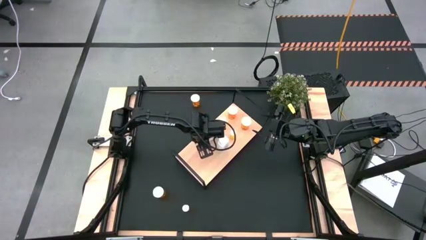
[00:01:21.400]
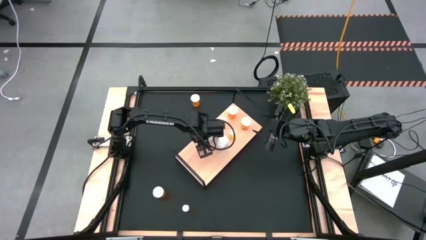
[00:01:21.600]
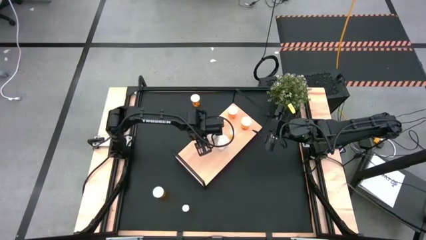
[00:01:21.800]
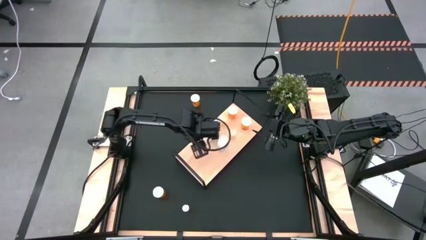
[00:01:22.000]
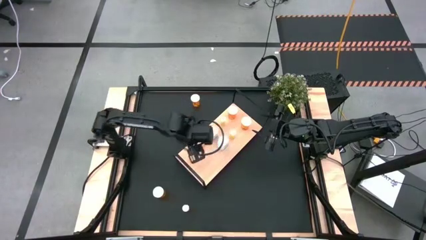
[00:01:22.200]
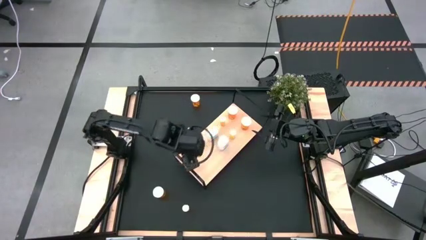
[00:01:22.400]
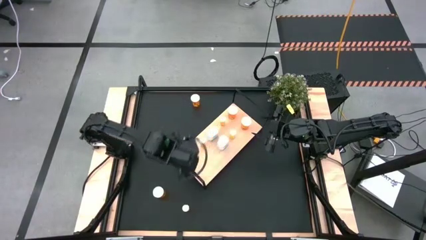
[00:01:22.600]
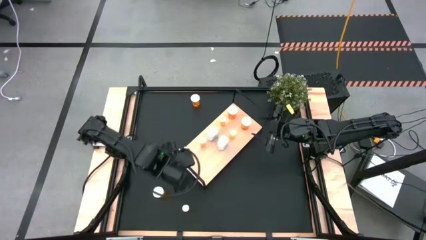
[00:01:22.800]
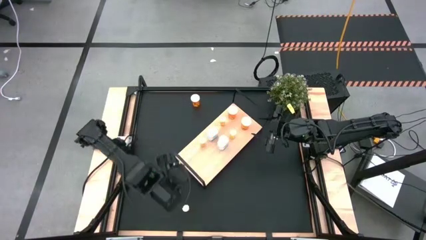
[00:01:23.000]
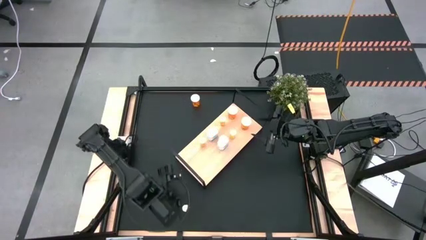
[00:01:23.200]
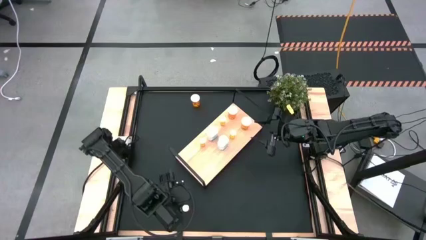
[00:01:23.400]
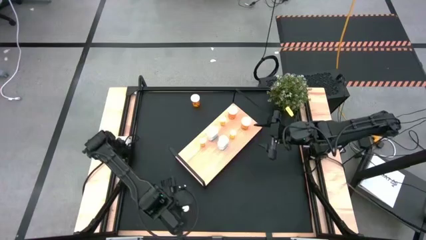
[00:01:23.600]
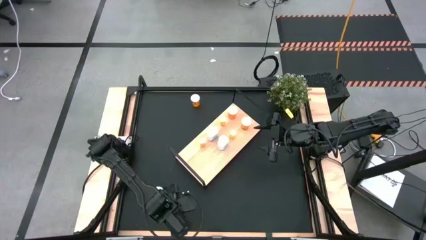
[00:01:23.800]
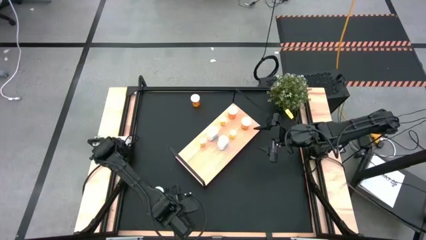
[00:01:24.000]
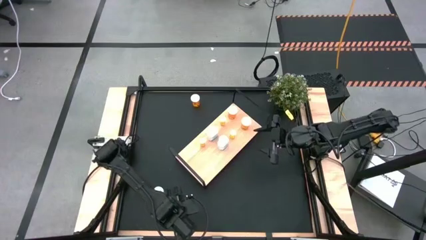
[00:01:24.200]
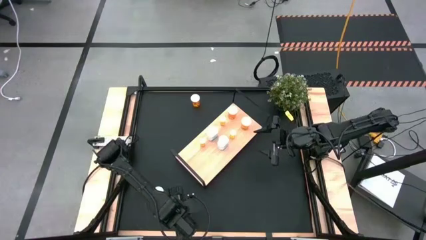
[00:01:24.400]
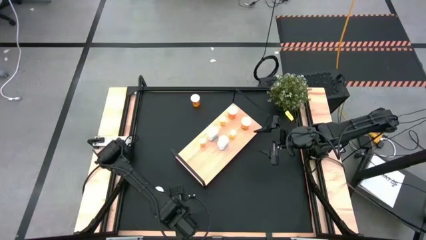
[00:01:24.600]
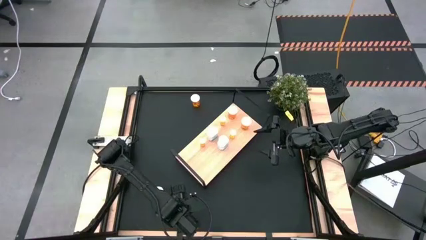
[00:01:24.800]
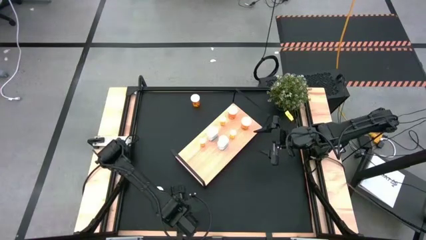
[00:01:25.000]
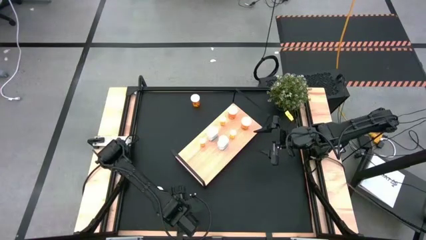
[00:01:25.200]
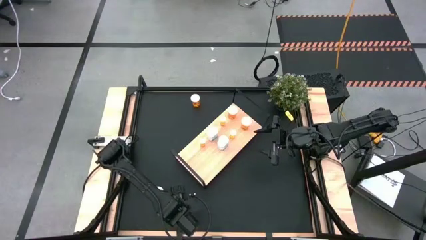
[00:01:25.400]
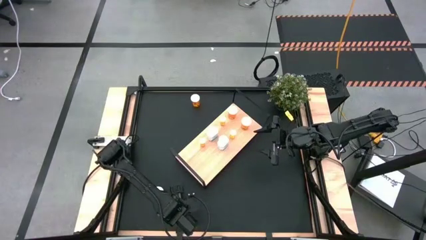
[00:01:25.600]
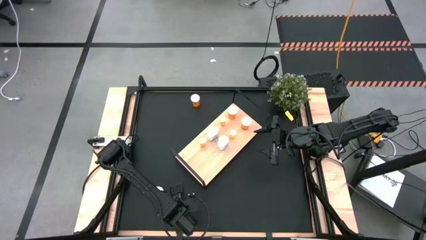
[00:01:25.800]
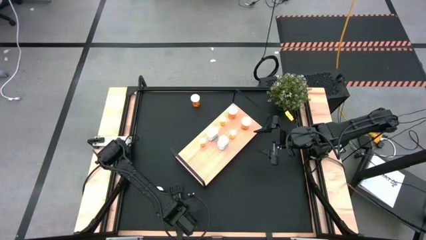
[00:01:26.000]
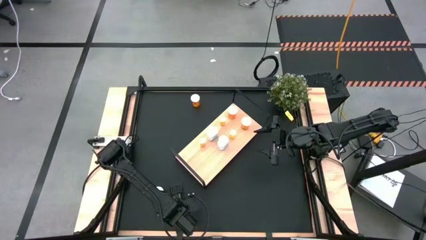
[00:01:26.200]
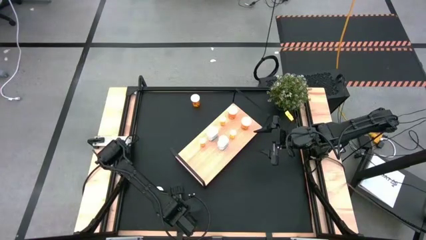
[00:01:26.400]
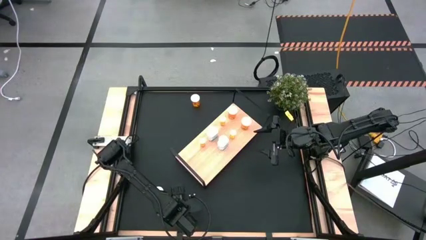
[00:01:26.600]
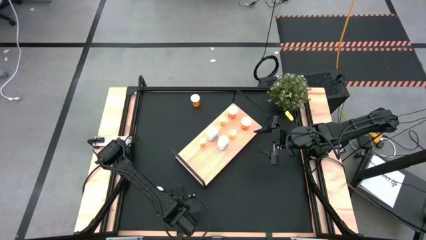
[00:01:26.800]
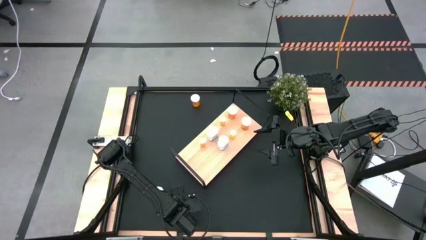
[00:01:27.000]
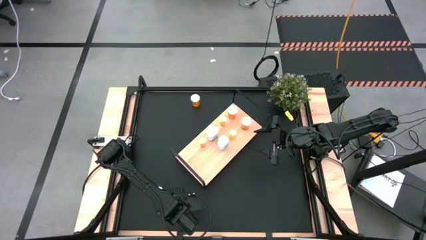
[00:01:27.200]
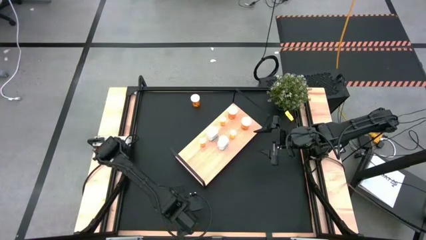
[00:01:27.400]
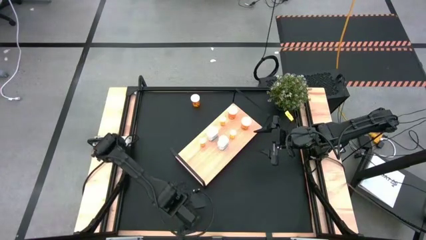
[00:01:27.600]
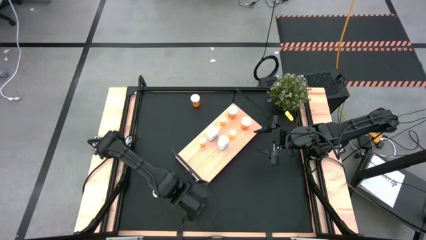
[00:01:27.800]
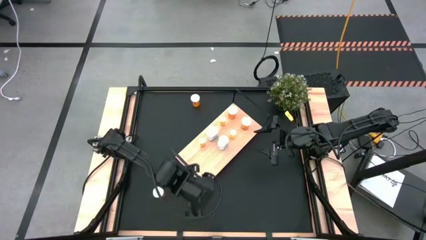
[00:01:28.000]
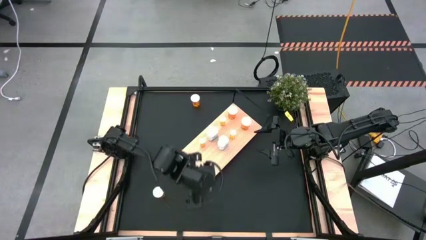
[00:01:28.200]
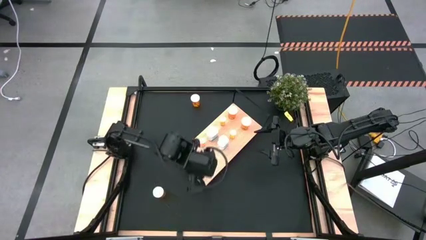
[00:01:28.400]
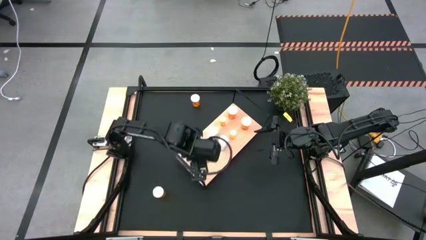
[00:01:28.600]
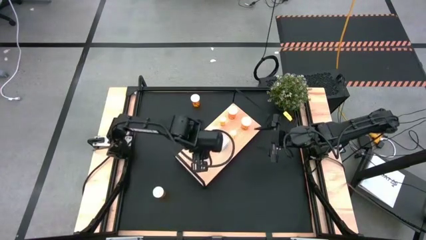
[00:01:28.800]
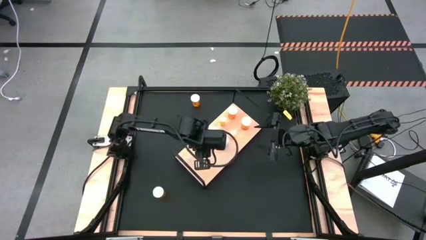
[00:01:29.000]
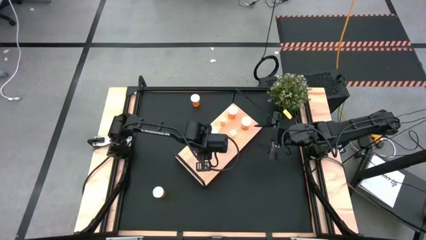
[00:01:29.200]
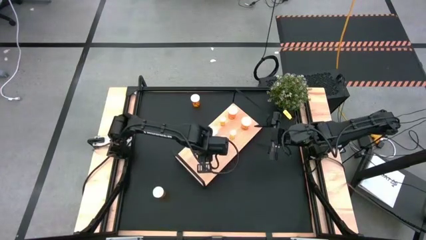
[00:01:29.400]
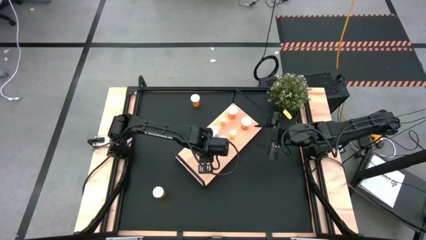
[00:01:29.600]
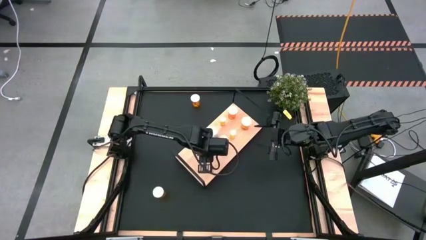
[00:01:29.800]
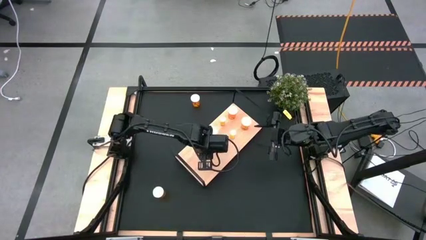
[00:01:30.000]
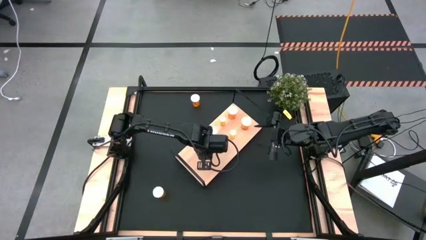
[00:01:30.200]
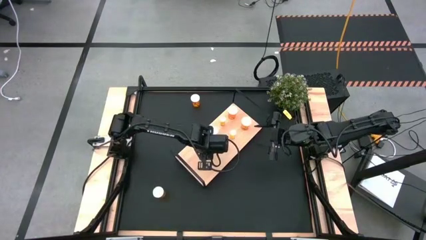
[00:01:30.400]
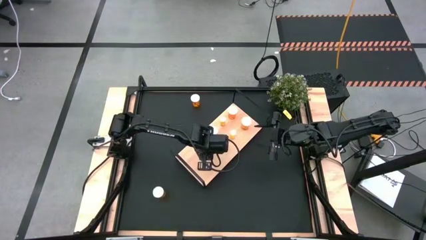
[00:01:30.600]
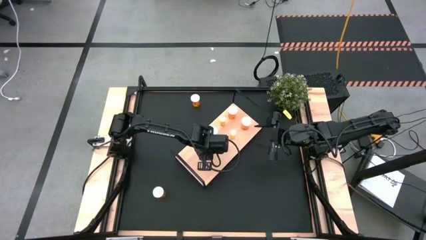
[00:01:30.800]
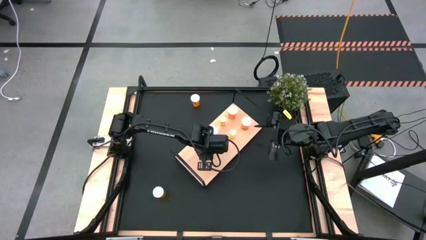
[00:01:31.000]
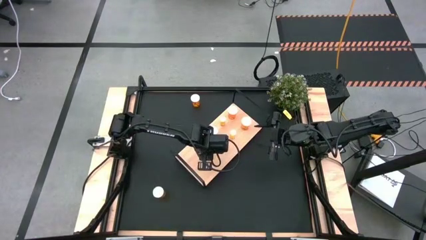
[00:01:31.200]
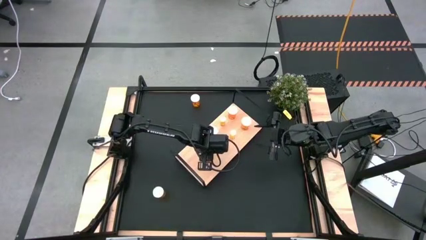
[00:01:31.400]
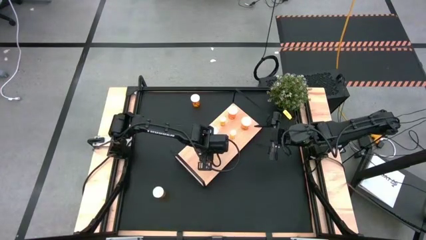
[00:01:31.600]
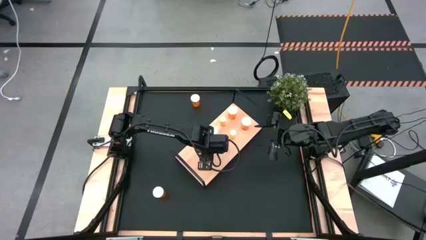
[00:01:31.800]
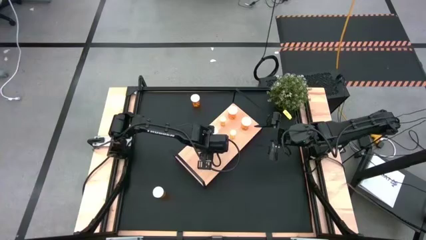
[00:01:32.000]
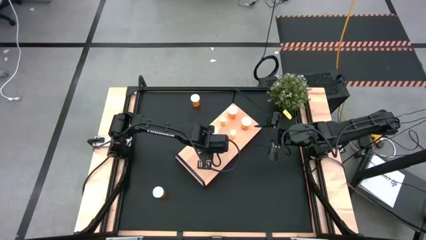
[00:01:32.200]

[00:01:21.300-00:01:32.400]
Task: Pick and place medicine bottles onto shelf by color
Align the small pill bottle with the other small pill bottle on the shelf

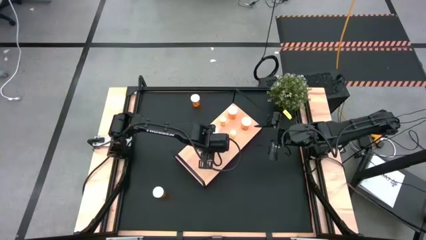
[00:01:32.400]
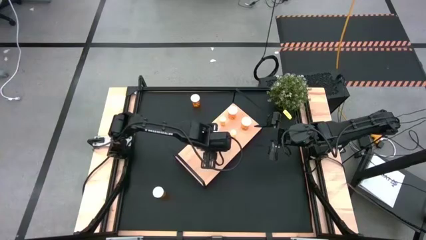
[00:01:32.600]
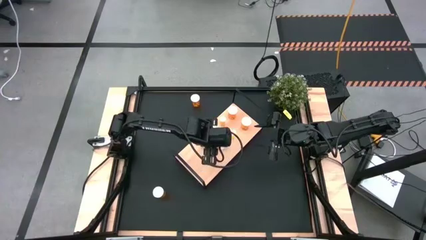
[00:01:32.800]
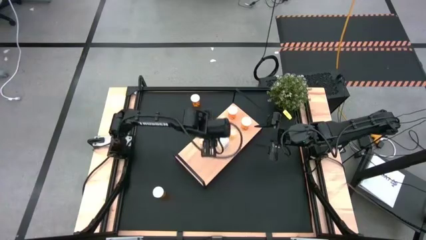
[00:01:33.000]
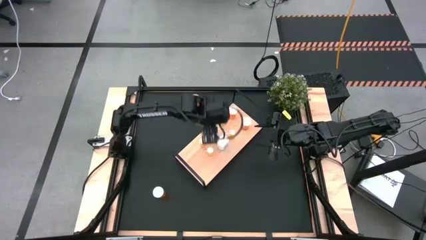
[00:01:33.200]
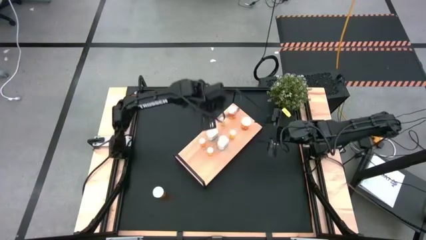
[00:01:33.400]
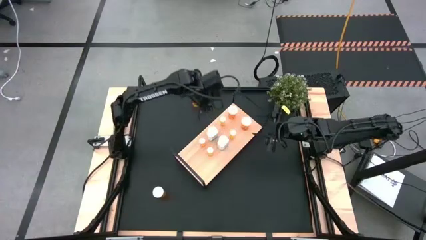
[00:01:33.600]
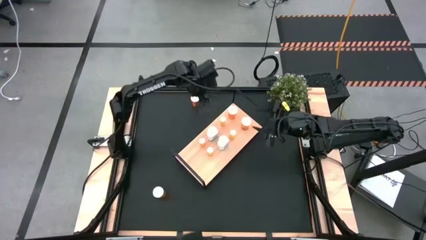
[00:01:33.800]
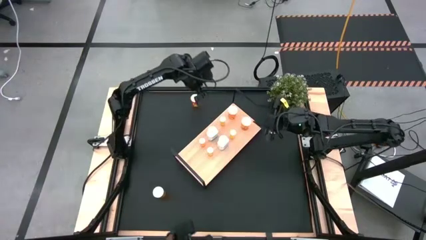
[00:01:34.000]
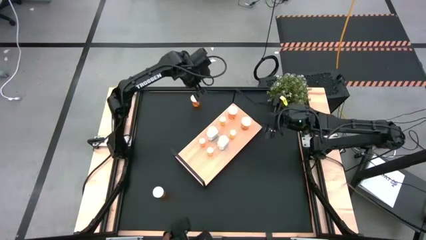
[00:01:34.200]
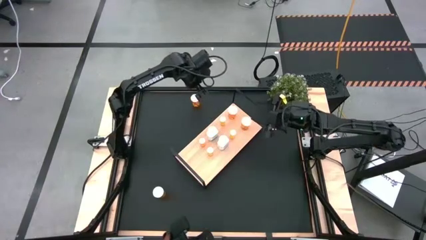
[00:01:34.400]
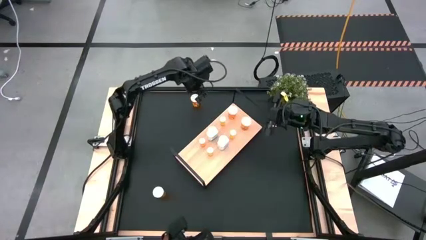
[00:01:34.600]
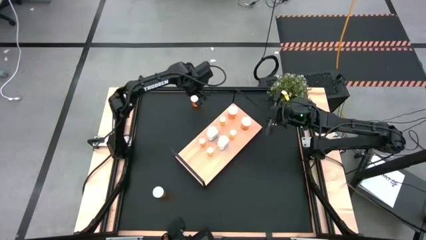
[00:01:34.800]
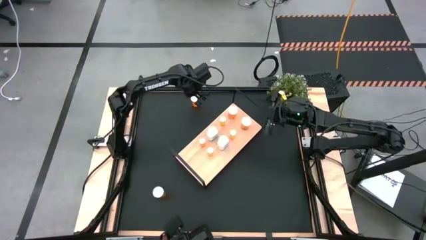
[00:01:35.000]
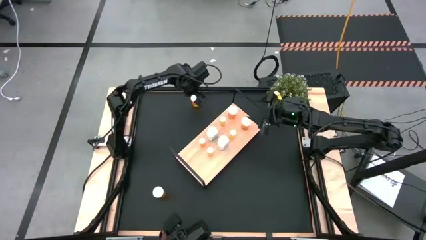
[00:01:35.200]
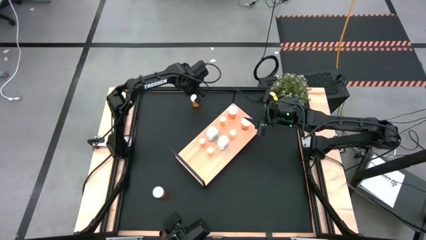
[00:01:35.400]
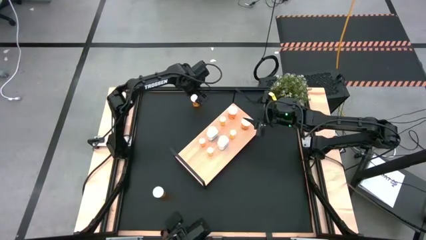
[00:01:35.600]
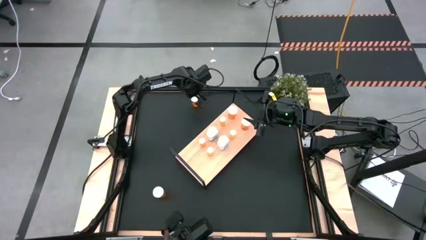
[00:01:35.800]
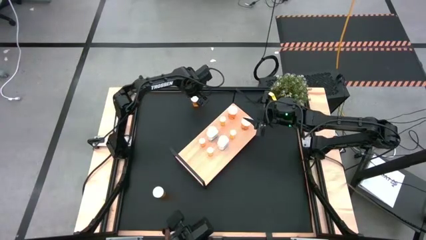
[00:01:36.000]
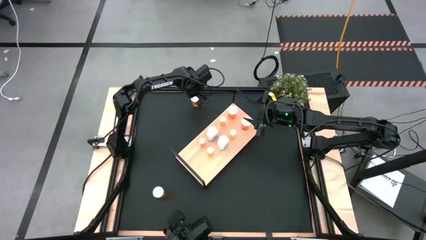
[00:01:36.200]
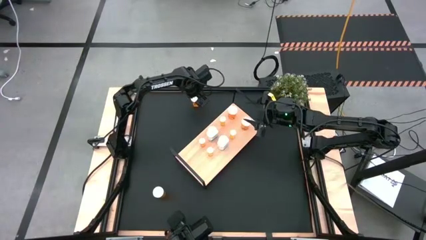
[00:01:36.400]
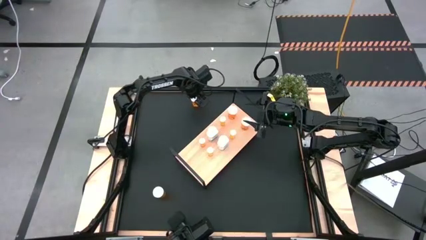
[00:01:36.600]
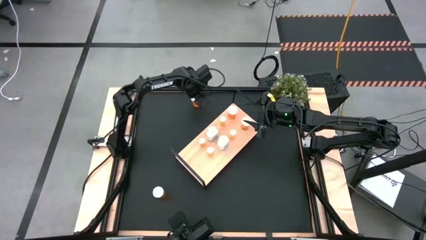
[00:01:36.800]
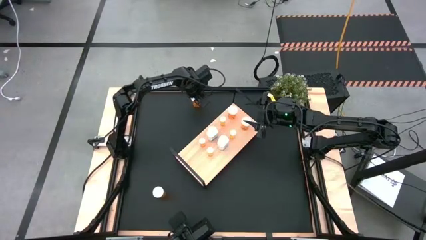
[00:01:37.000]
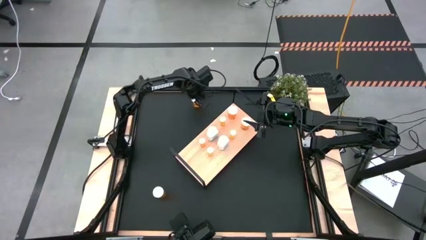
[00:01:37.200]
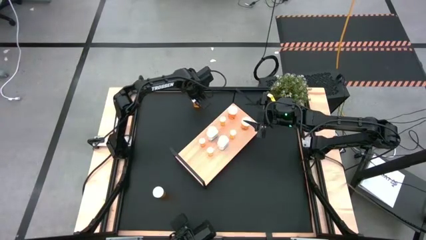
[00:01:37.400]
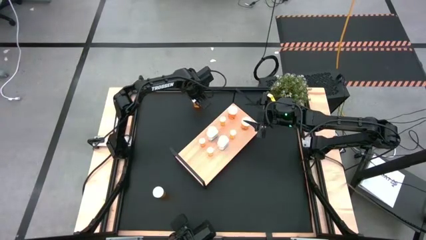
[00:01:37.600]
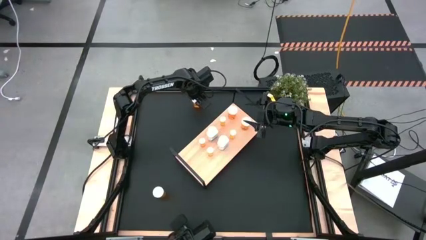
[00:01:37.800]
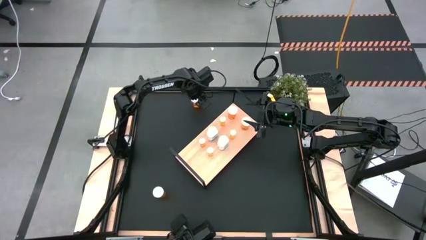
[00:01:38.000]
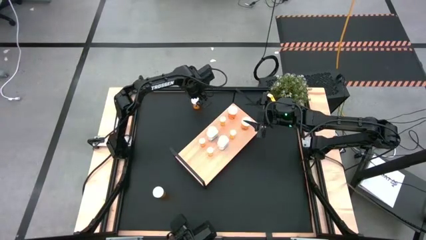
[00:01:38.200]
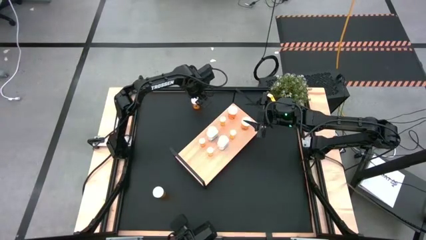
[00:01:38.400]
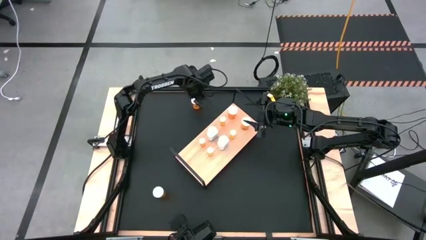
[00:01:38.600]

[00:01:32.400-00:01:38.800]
Put the large orange pill bottle on the shelf
